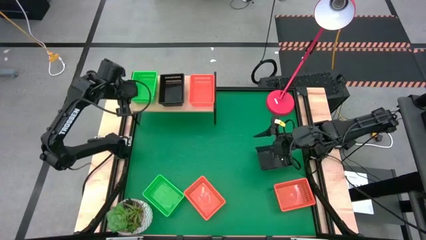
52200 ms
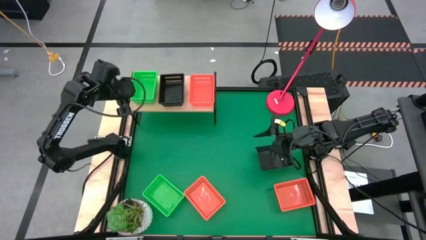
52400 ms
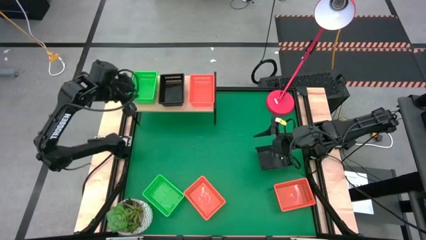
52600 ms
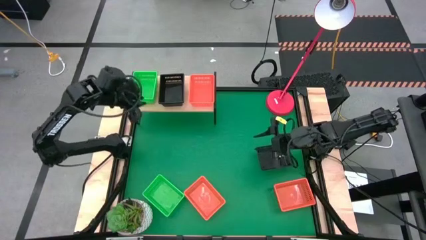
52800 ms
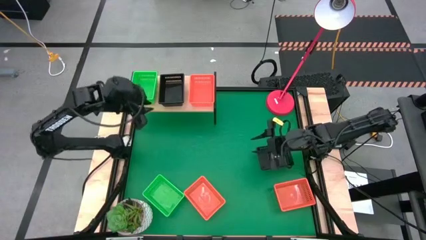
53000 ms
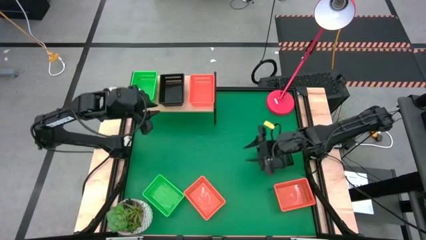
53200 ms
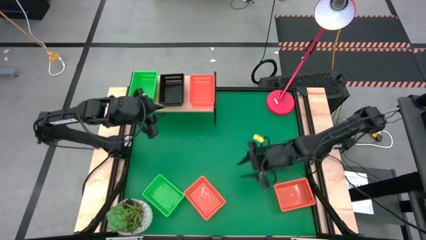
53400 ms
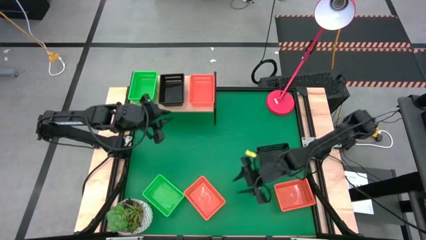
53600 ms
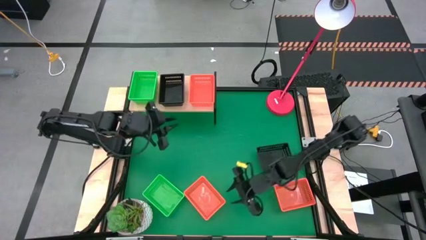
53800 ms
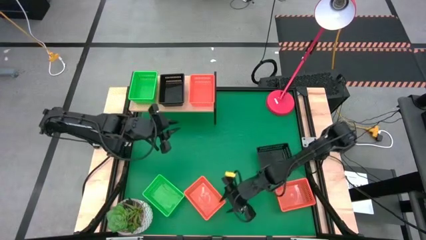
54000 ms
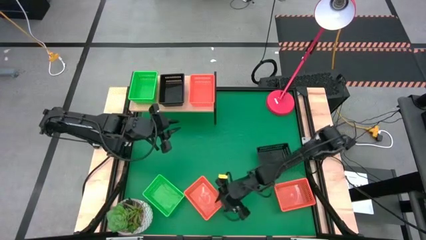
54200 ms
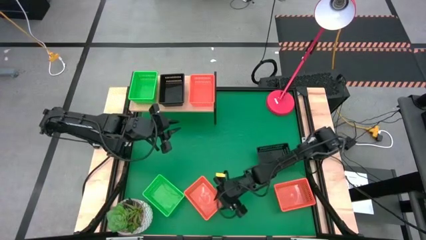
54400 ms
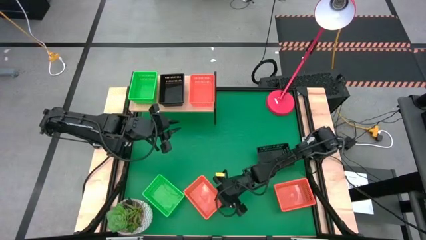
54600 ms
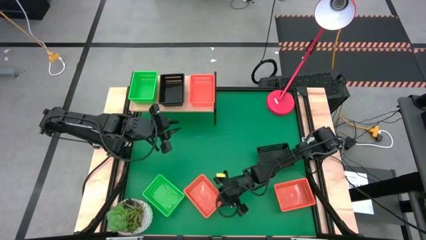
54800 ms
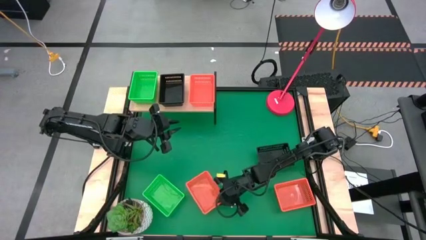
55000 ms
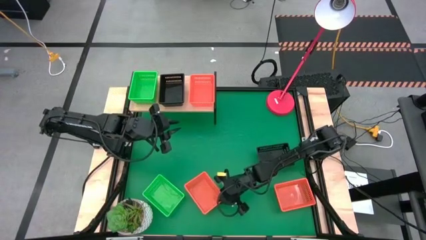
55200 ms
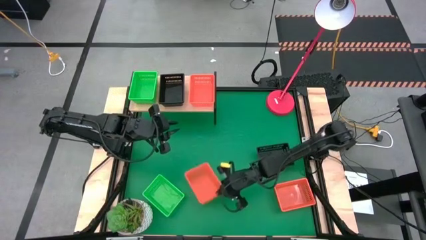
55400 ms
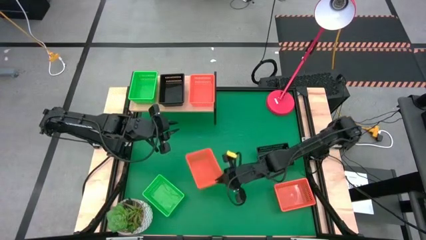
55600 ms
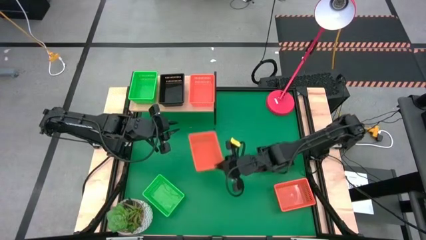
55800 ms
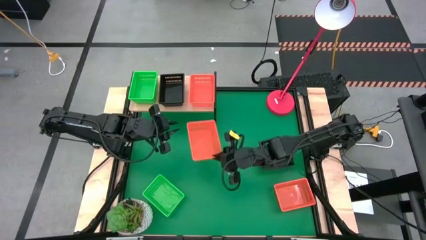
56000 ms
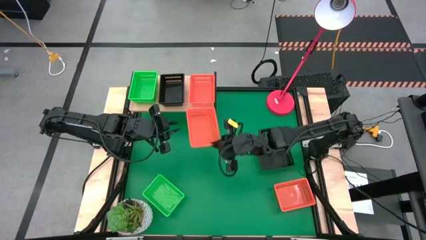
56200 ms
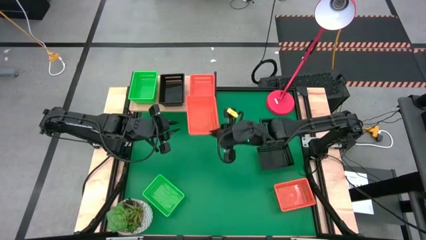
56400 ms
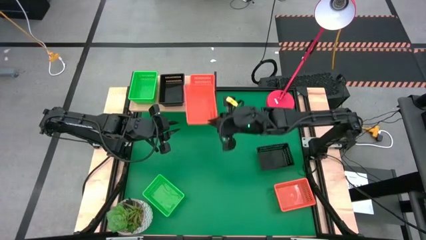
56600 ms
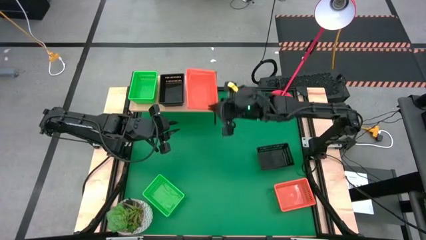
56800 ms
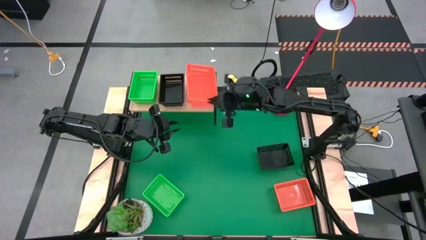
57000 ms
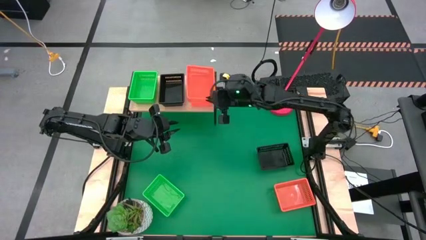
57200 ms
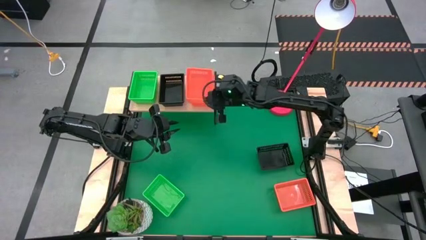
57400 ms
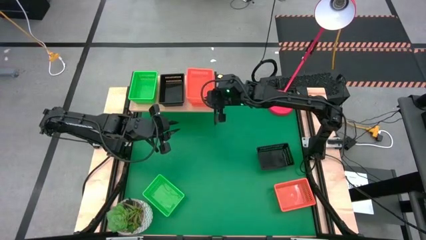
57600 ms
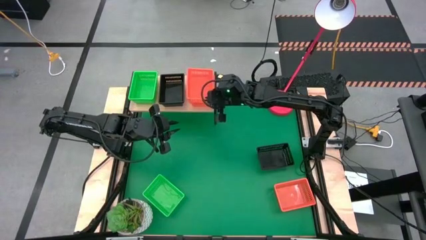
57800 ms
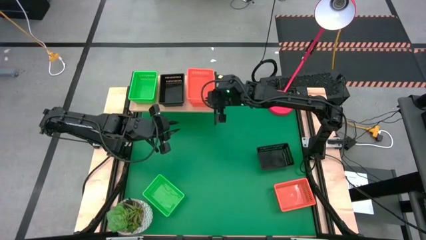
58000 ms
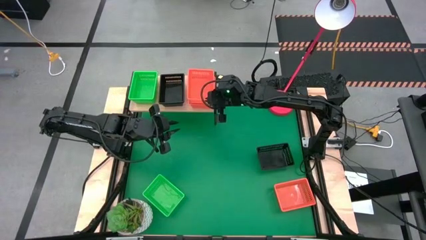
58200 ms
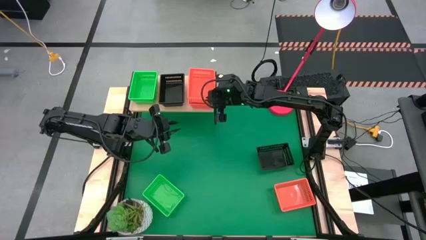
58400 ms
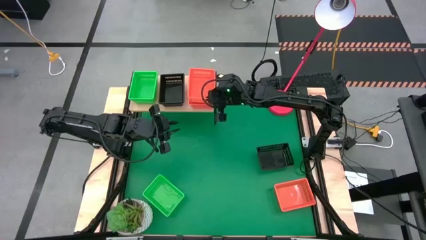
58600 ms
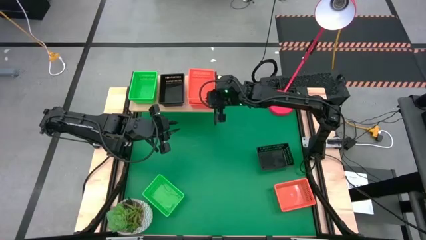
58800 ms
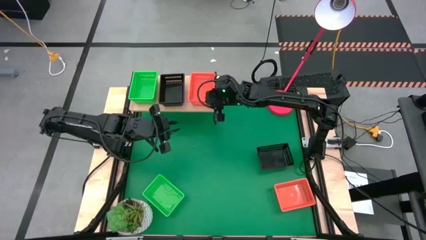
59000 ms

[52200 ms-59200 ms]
Task: Stack baskets on shelf by color
Stack the left orange basket on top of the other orange basket on the shelf

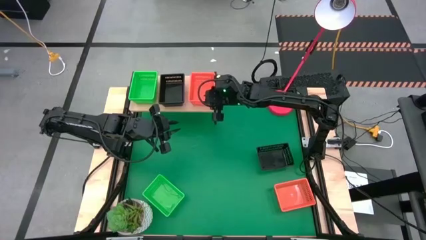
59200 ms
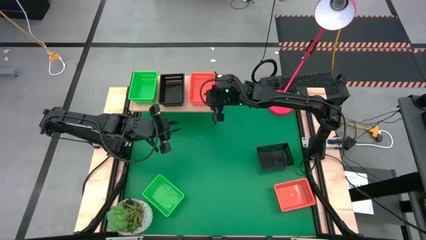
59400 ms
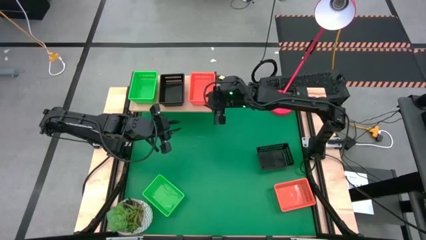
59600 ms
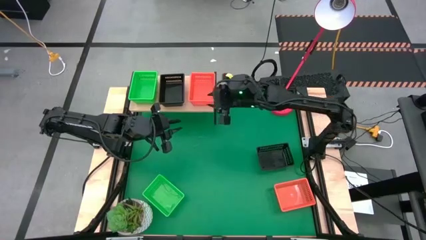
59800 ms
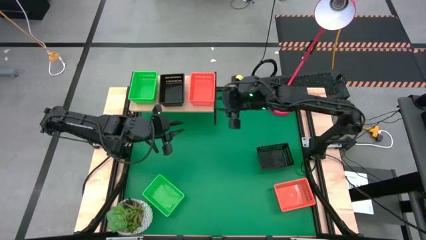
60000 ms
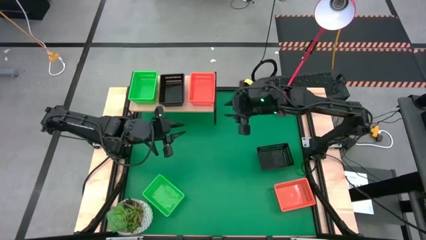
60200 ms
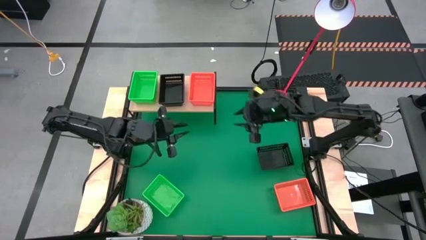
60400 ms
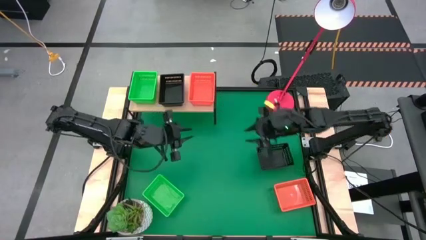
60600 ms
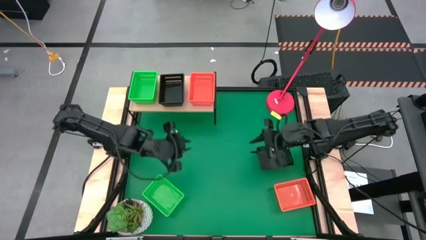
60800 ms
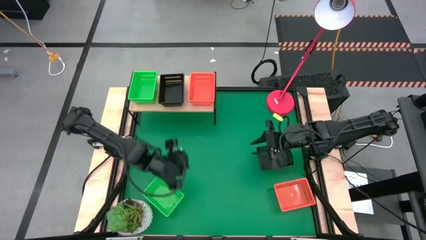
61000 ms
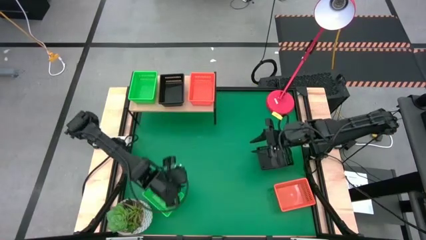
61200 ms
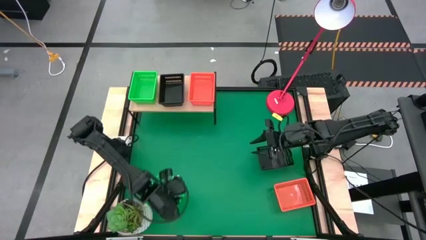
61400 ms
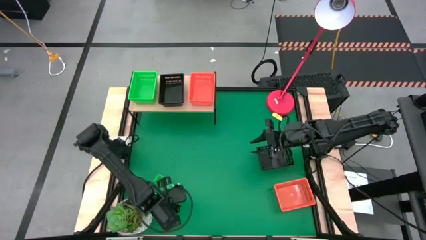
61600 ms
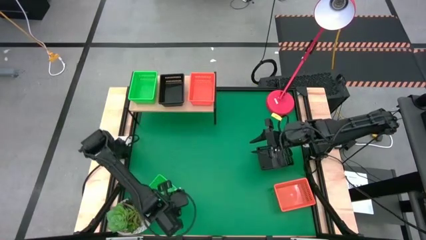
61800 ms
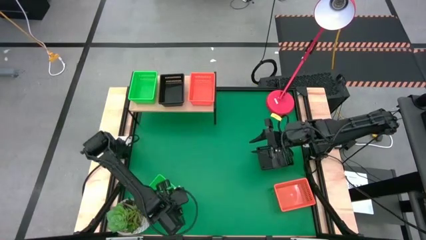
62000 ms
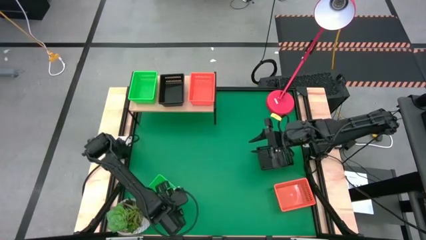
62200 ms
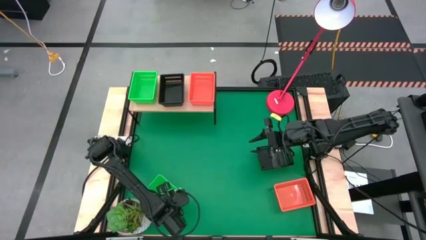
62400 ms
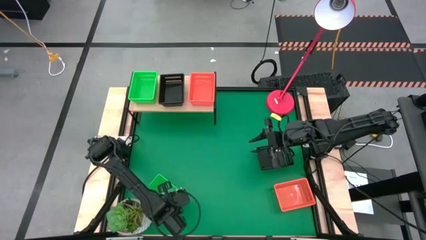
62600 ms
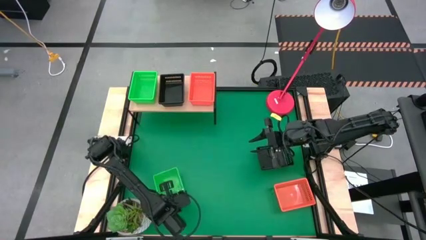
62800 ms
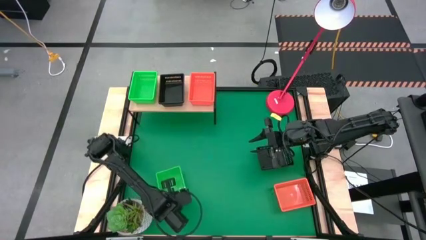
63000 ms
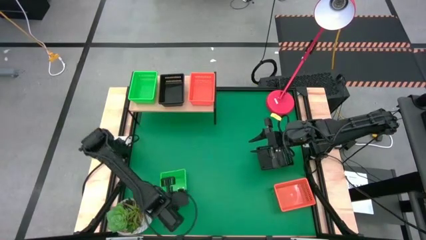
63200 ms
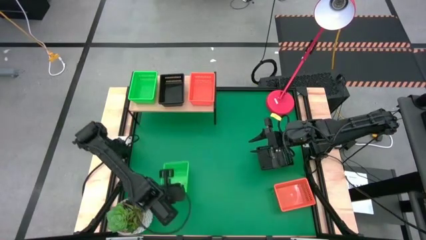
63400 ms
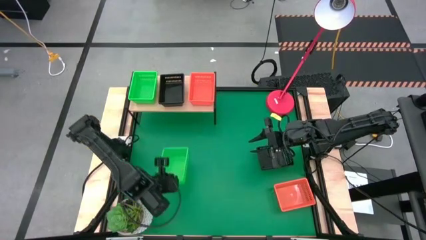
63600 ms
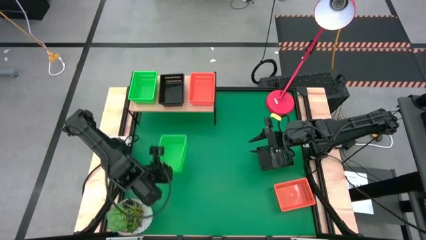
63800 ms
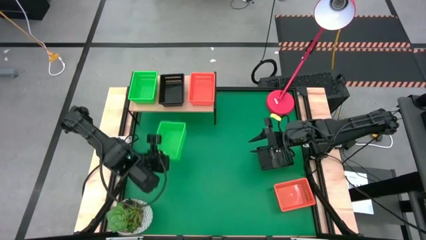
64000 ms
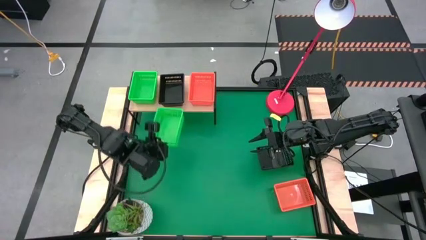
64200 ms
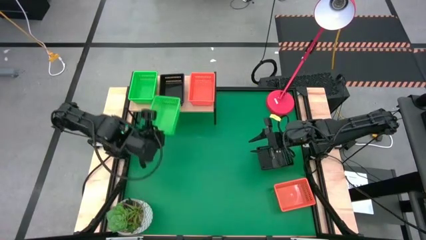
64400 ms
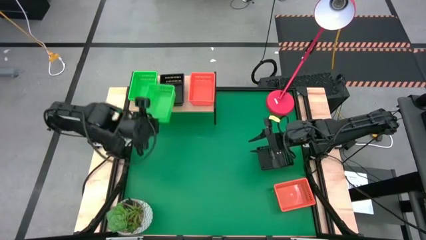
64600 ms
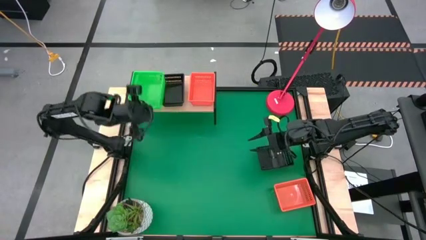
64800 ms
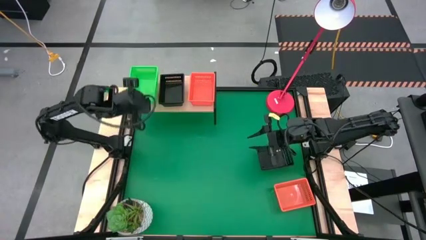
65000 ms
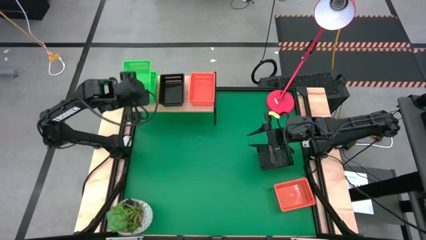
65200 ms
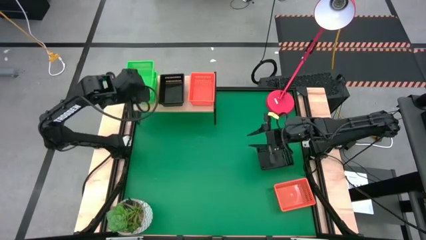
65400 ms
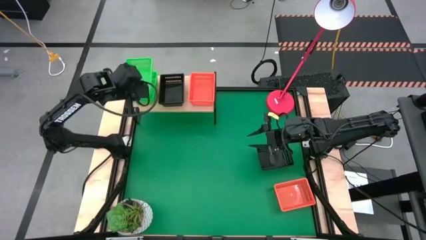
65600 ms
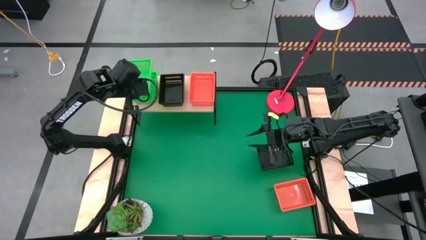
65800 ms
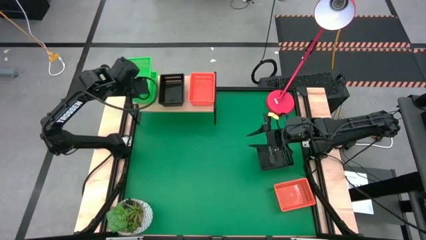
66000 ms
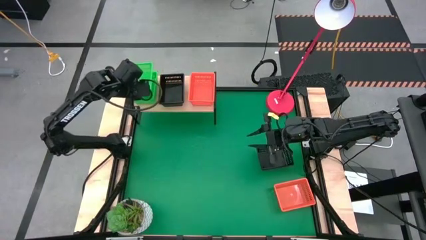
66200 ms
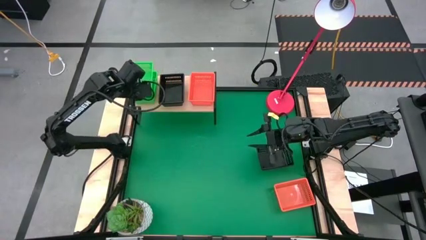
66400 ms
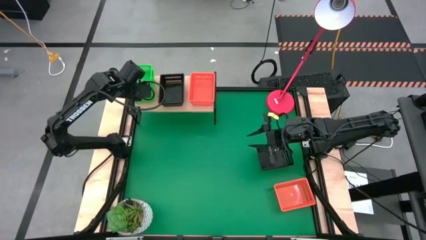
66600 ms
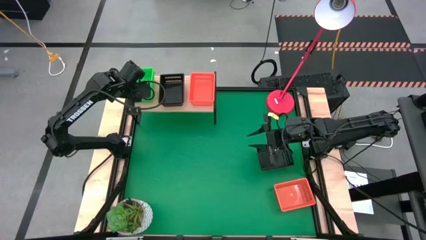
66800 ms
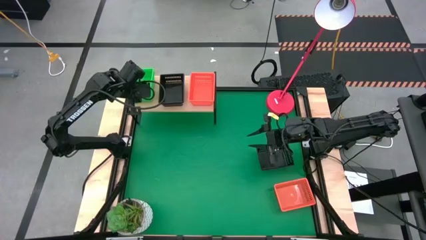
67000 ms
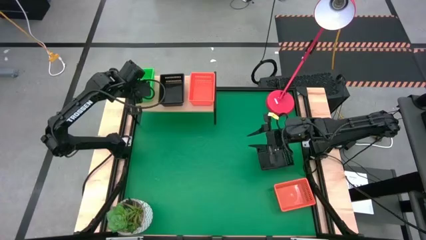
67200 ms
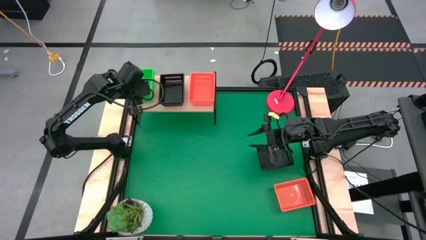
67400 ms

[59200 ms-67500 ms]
Stack the green basket on top of the other green baskets on the shelf

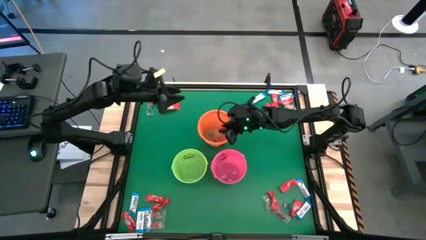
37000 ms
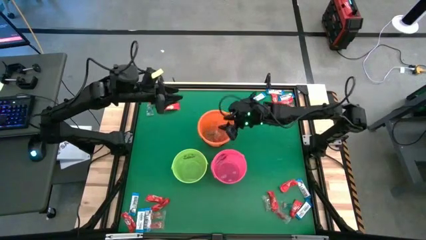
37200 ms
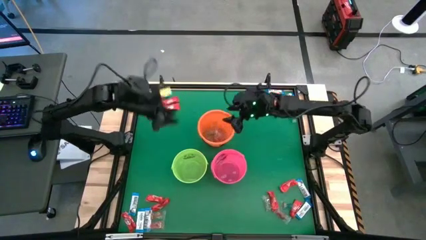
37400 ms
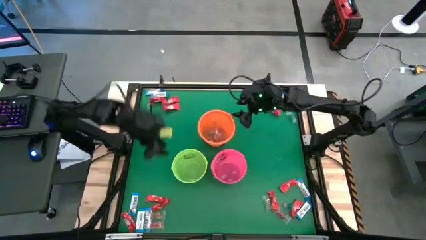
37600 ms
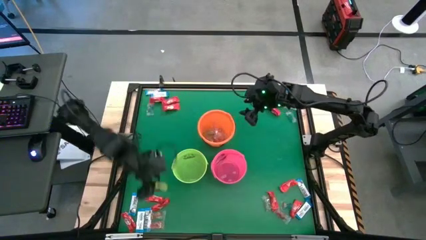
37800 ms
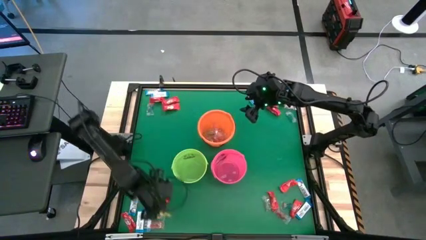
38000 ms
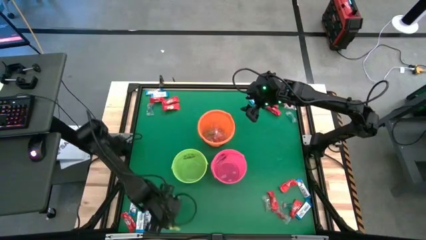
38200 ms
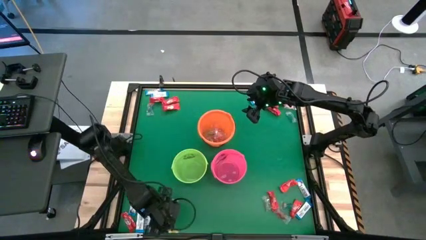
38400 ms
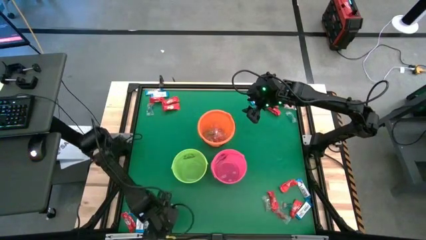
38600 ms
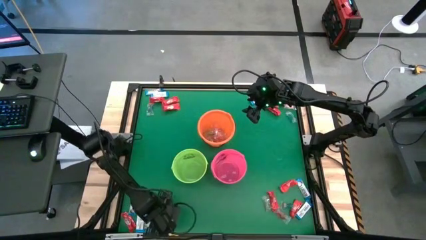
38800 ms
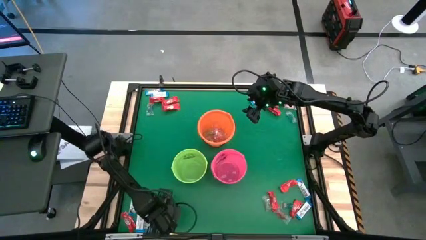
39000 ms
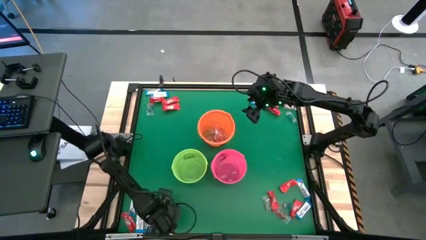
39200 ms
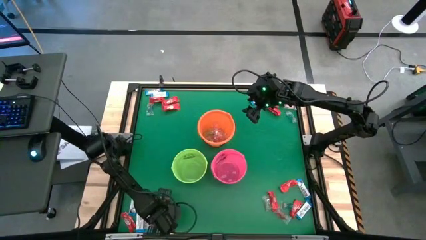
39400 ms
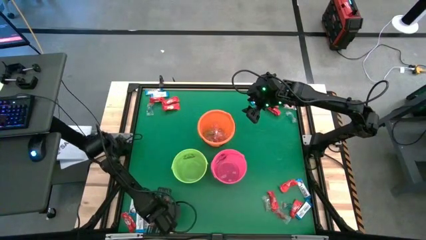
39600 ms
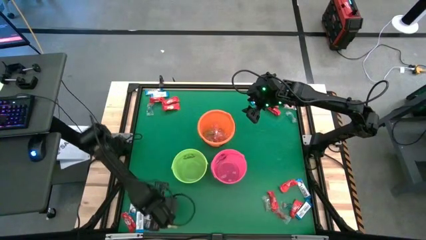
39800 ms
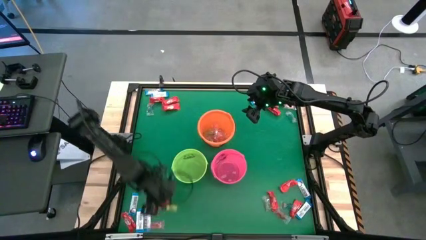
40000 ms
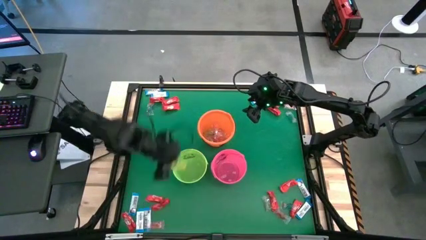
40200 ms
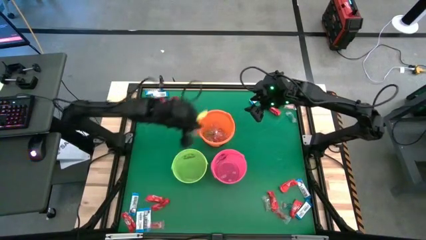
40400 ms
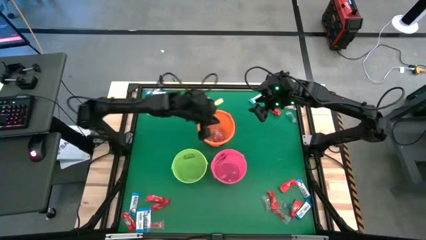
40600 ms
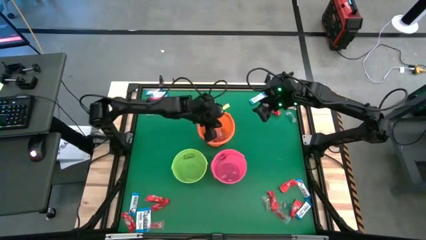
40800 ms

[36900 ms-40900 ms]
Task: Sort candy by brand, put in halloween buckets
Put the orange gummy into the orange bucket
